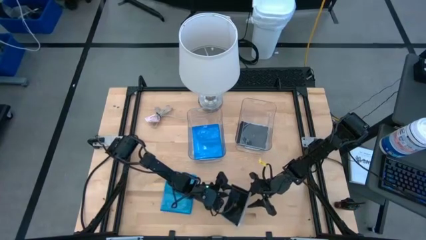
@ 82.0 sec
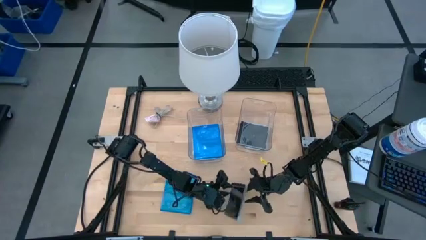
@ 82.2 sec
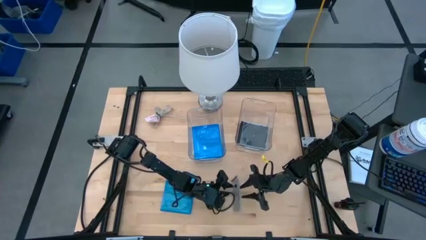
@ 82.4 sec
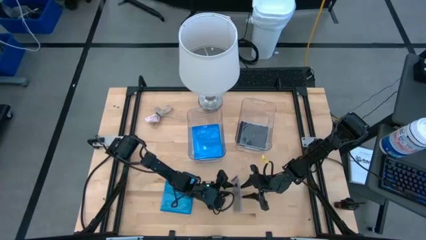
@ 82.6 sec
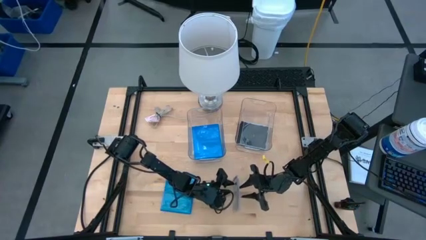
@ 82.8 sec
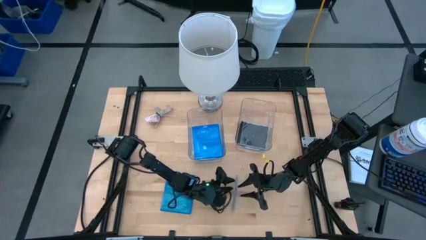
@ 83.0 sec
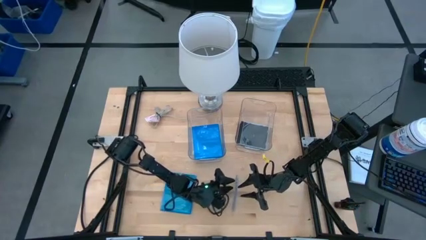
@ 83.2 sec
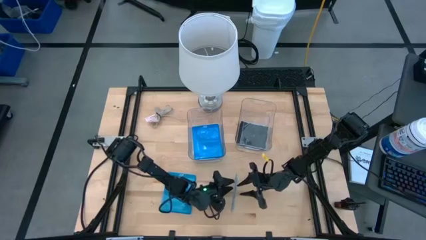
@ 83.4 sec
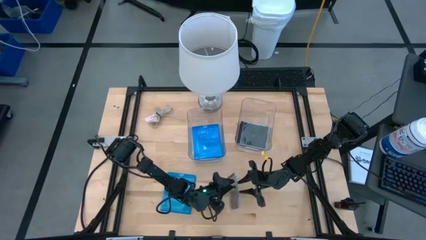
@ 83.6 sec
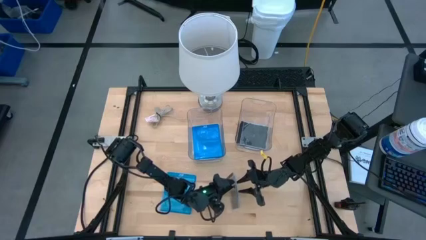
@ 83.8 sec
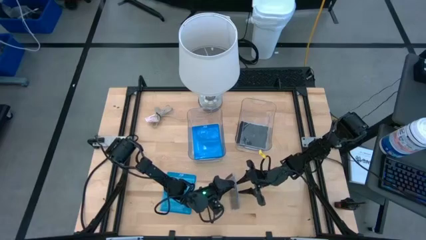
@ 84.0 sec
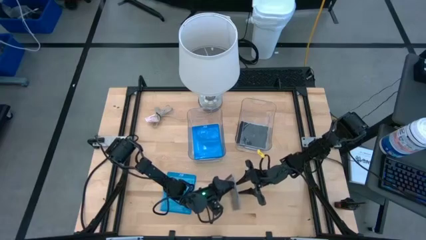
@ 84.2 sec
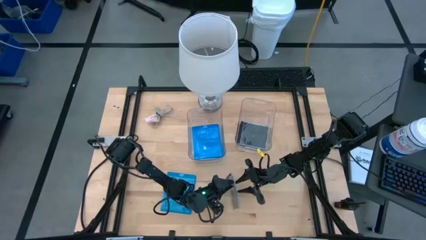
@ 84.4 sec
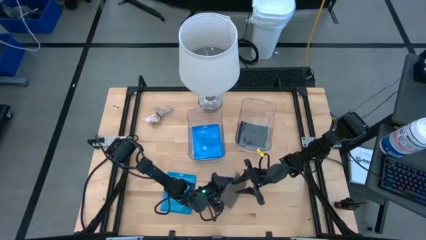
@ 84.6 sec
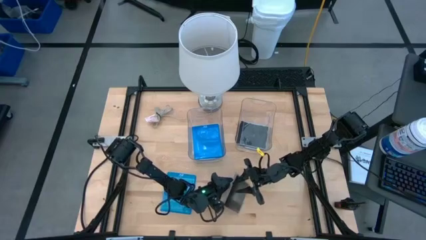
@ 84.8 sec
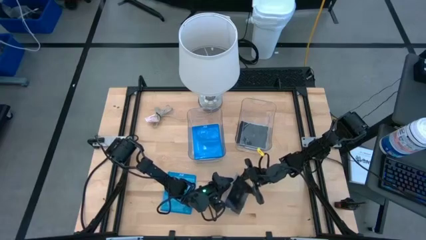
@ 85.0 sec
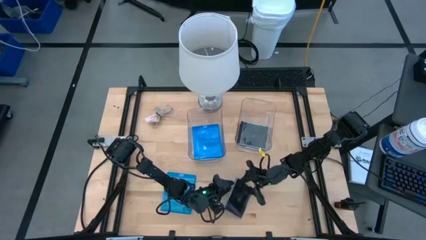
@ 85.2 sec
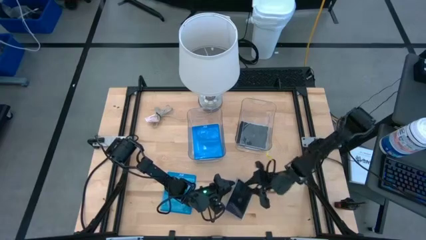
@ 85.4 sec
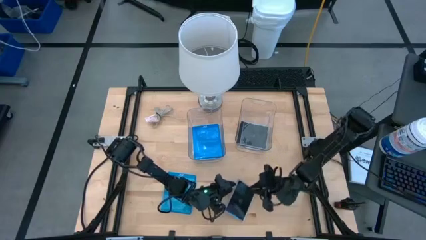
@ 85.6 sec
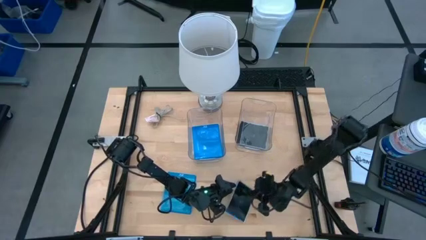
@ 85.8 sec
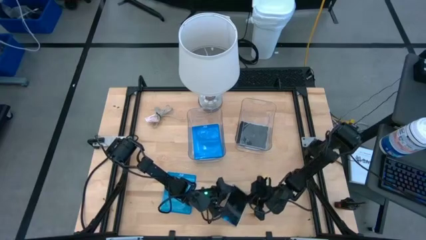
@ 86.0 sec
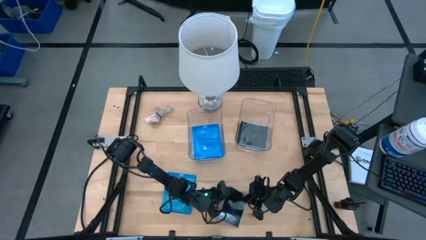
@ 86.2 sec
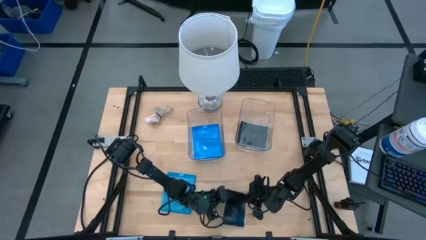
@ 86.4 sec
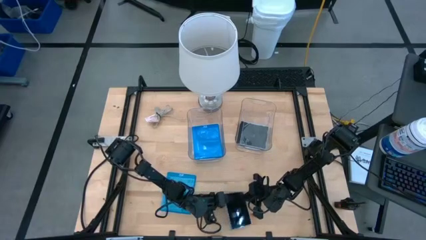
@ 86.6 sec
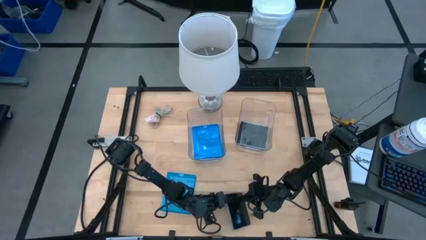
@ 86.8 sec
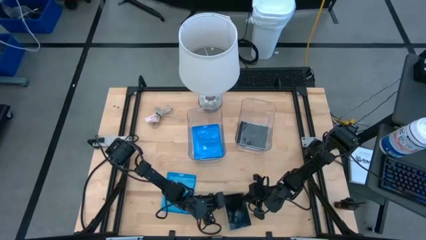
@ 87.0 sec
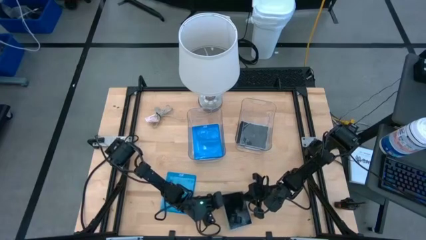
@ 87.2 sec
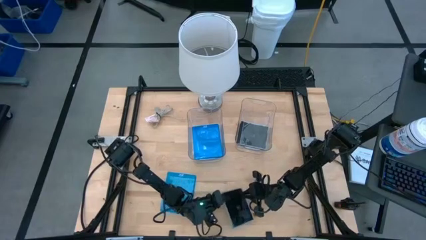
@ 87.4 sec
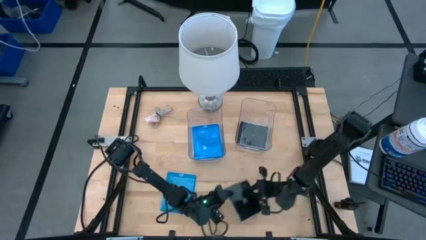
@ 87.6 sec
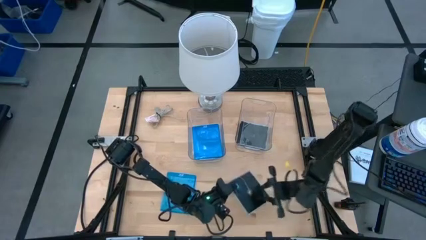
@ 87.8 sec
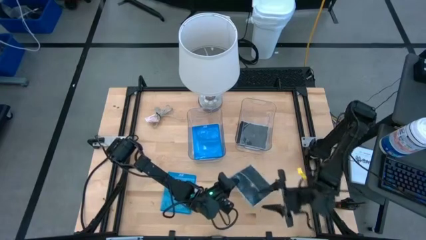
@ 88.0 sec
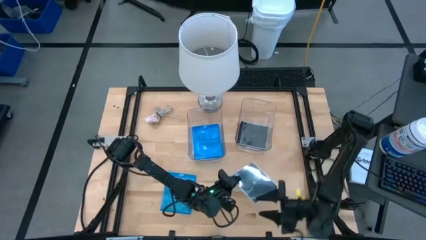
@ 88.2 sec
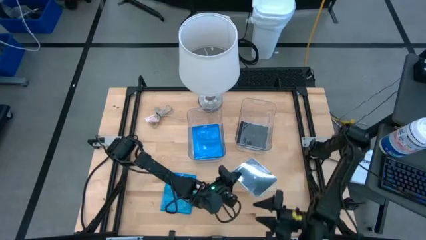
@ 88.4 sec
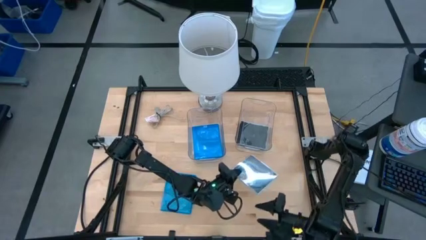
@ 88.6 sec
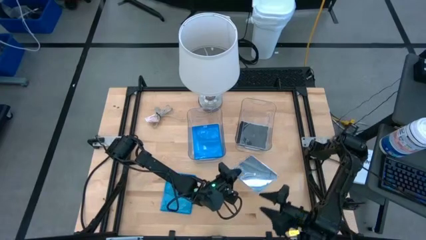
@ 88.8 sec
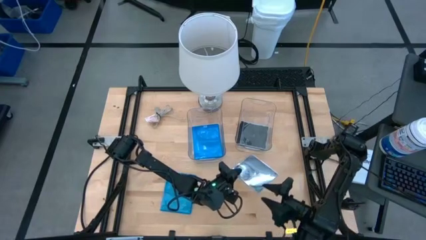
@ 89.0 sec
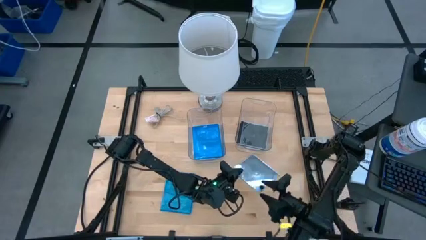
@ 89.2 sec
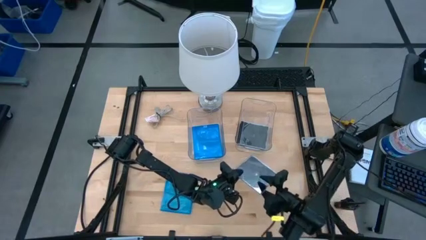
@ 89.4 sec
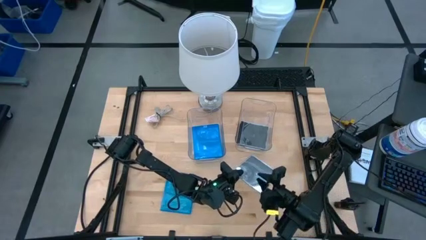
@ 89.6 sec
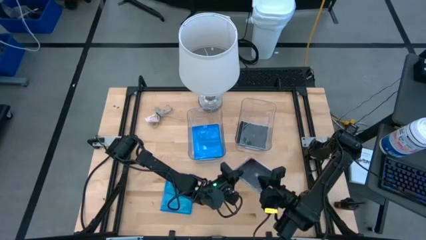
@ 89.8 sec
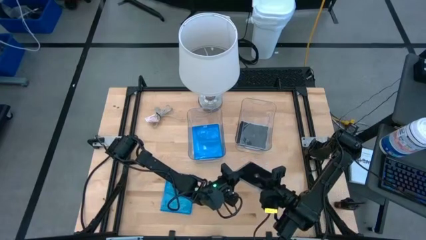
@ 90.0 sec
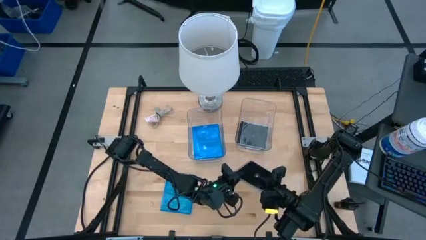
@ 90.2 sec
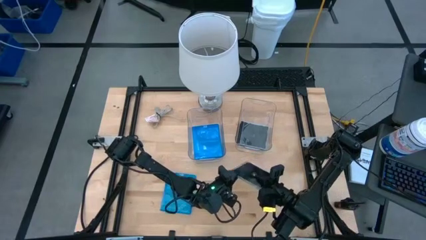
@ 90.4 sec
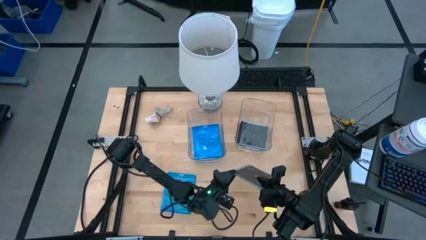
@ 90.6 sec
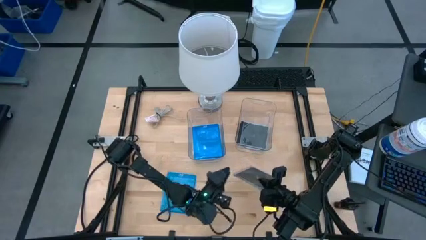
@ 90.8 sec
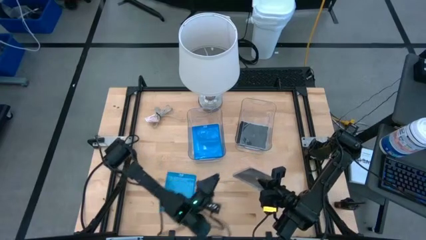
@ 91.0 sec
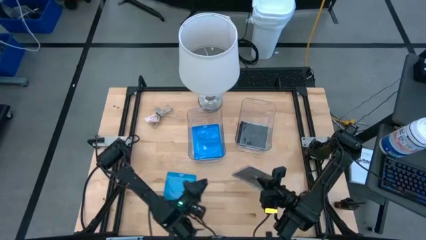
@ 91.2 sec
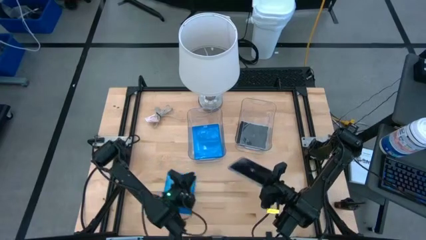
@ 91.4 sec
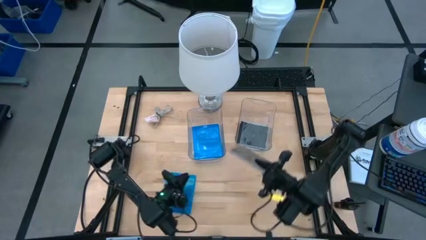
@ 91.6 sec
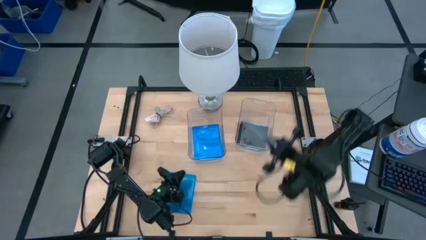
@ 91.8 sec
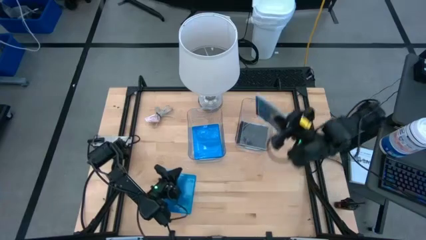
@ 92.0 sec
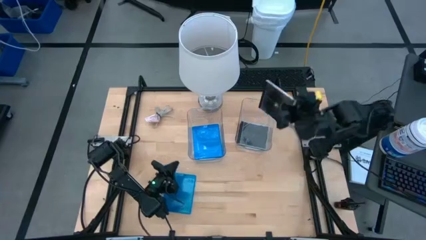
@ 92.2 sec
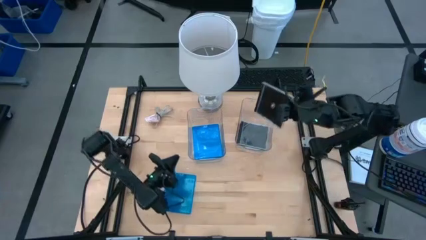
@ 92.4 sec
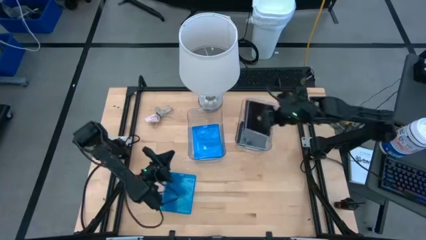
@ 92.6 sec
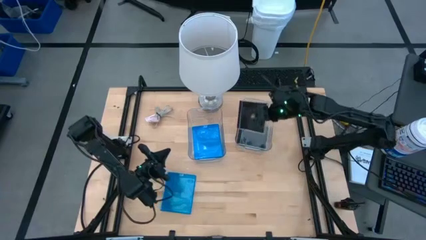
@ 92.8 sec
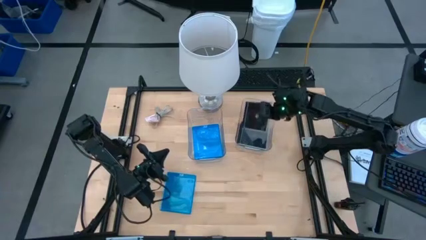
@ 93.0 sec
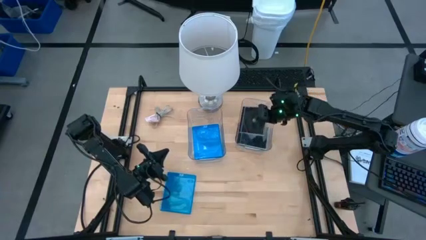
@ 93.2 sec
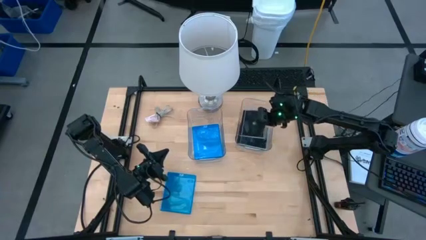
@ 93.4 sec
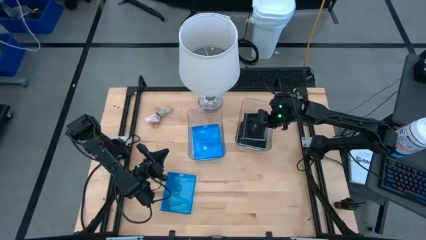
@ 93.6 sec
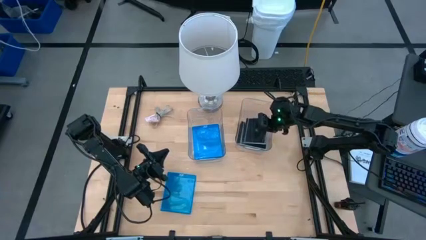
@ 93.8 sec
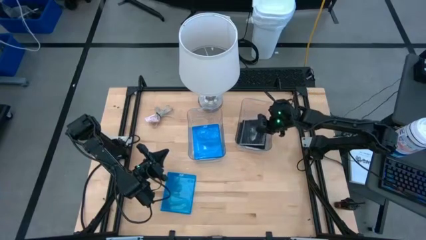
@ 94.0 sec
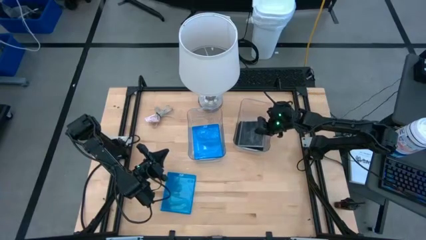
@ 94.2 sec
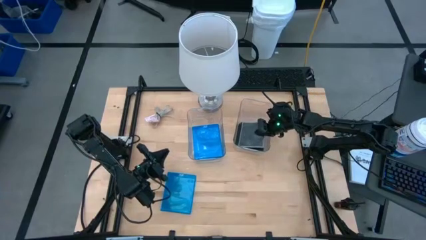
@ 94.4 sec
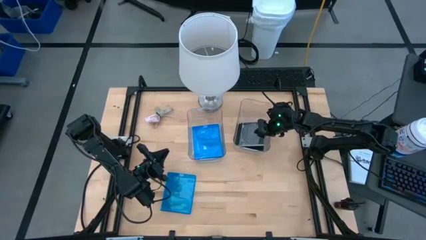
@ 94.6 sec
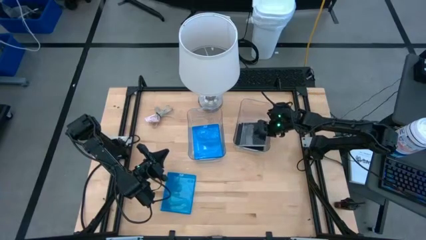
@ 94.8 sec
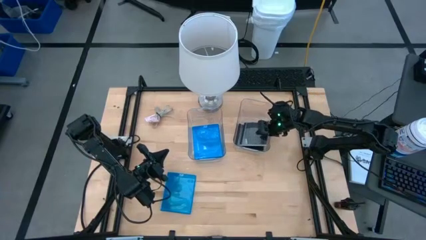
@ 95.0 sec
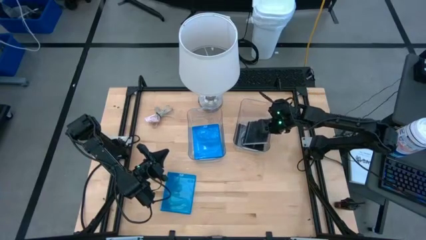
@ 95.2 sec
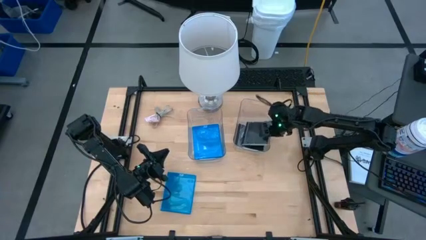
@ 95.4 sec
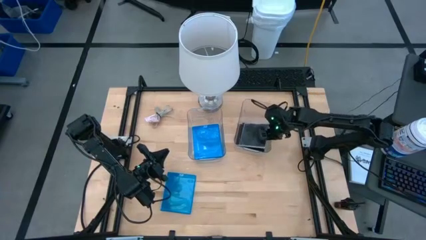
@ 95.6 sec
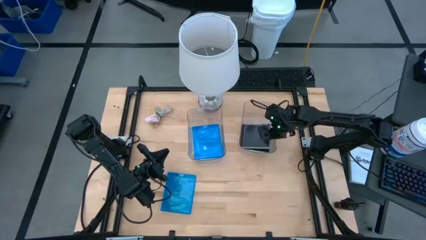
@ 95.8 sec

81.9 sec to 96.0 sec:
Task: Pick & place jewel cases by type
Put the black cd case into the right transparent bin
